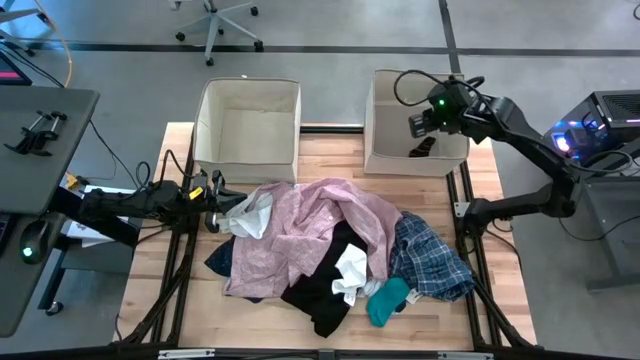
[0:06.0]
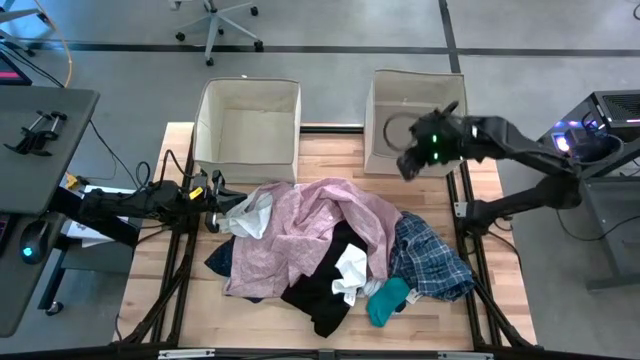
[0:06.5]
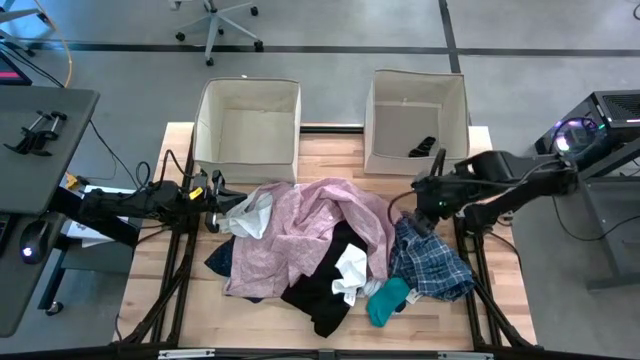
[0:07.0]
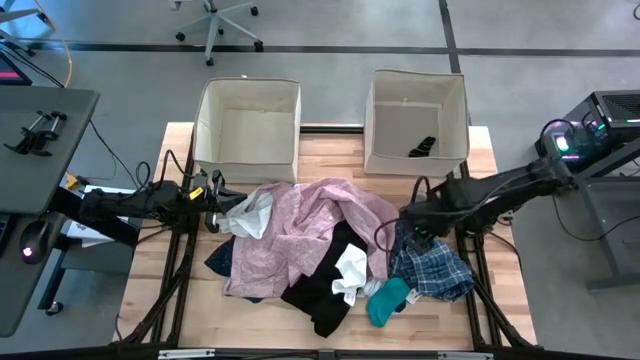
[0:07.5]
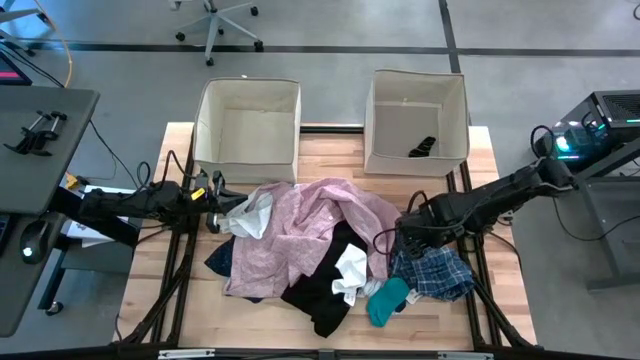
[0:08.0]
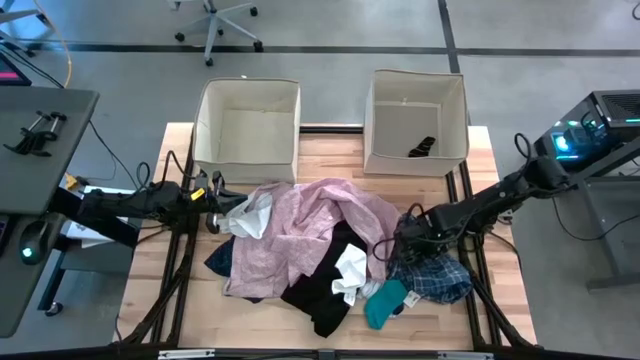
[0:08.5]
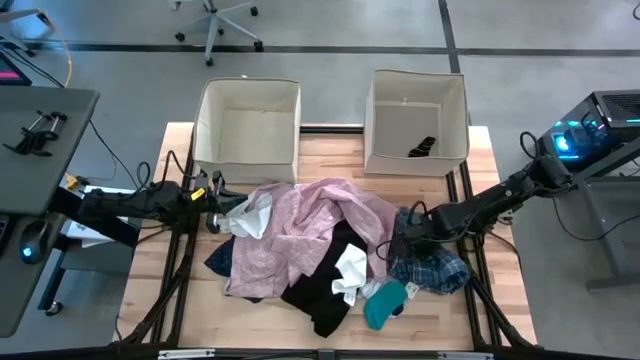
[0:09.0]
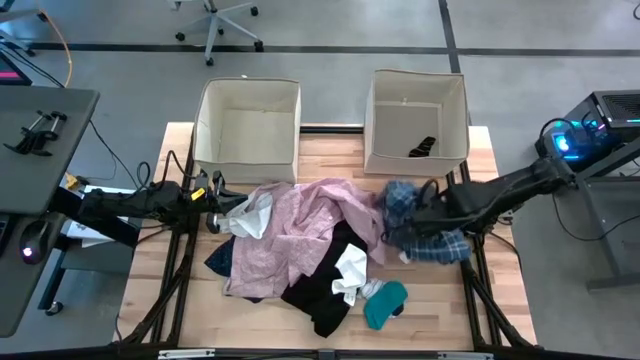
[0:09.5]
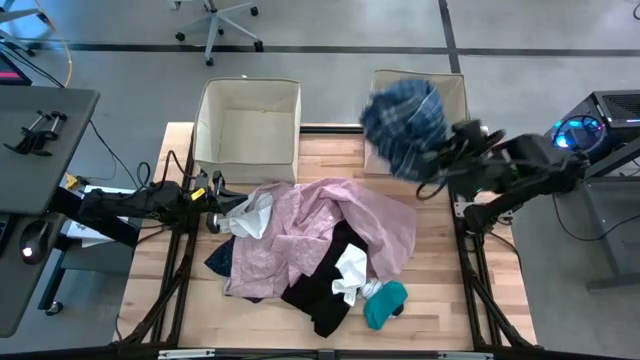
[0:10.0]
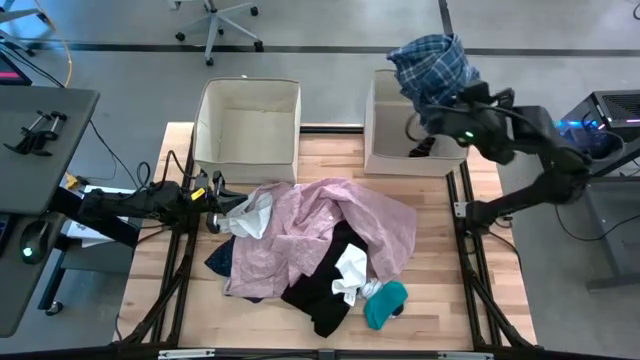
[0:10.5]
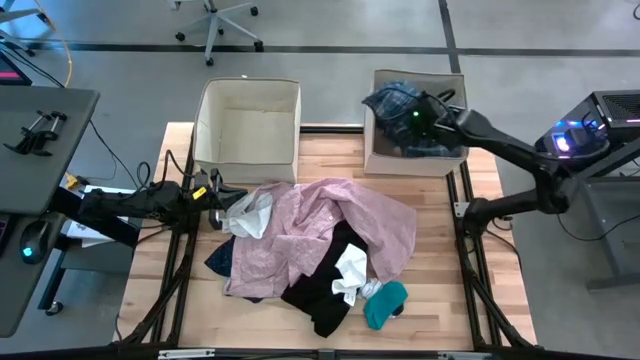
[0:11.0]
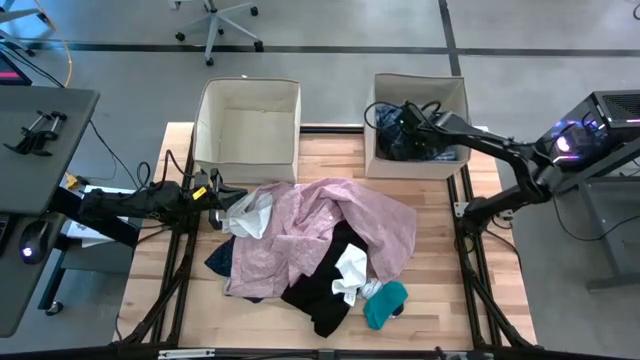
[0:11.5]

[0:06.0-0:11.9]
Task: Sort clothes
Put the blue checkered skirt into the top right laundry bin

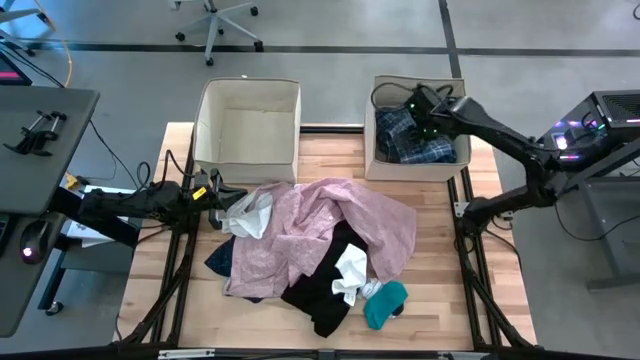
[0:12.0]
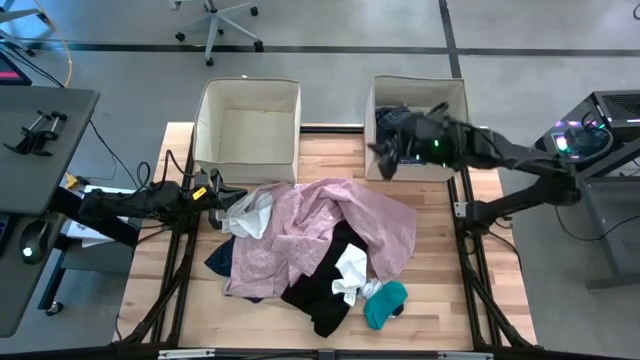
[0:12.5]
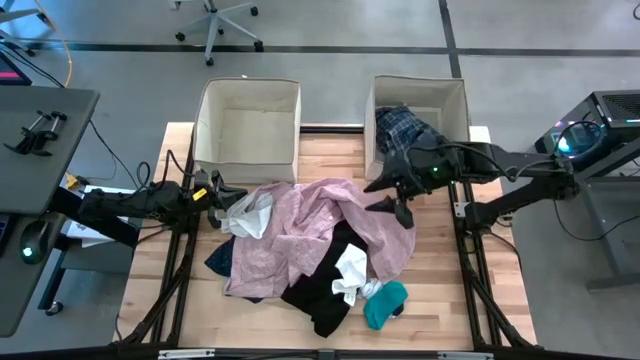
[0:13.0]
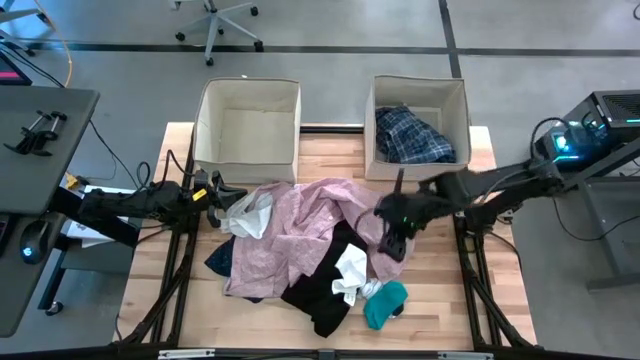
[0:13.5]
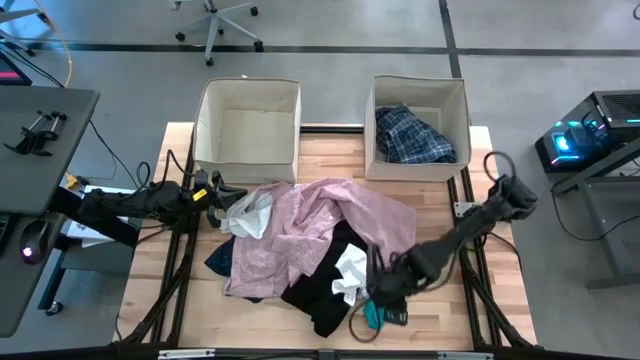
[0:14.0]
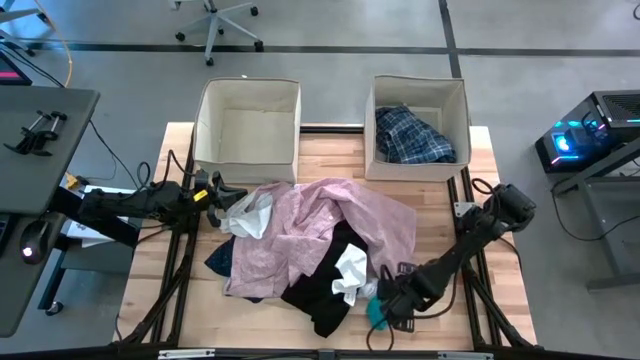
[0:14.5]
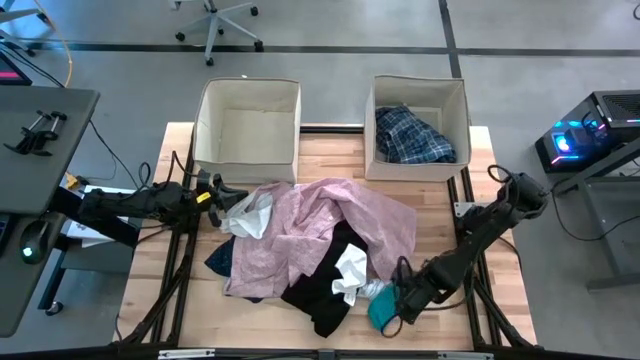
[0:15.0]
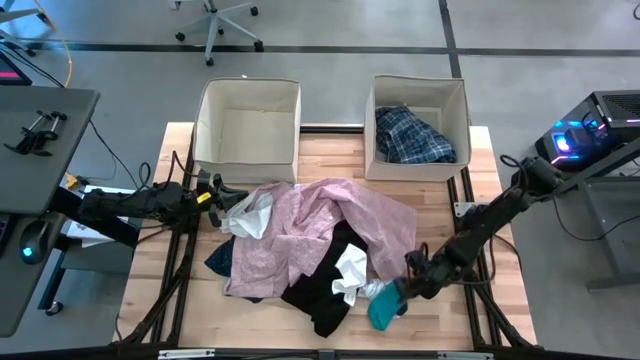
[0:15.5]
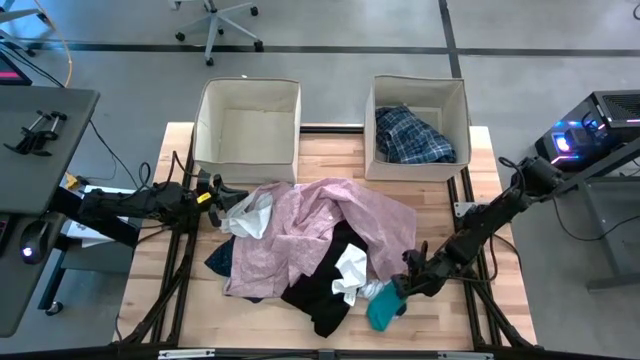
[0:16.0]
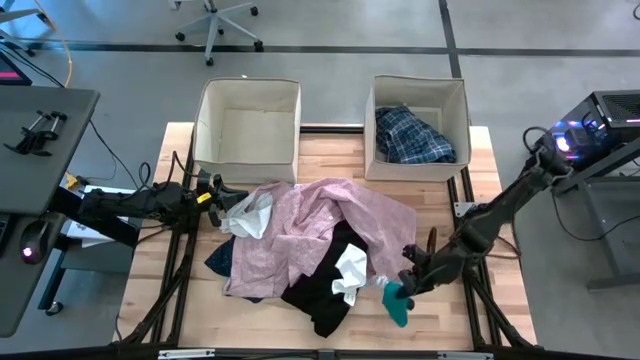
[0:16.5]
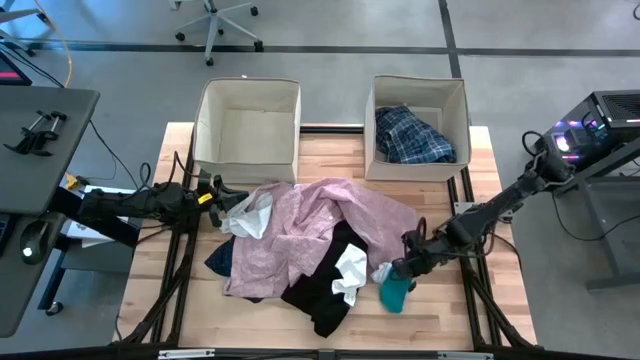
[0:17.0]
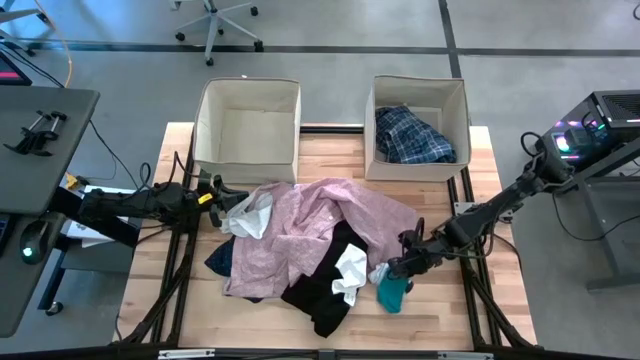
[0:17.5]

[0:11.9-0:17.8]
Put the blue sock into the top right laundry bin

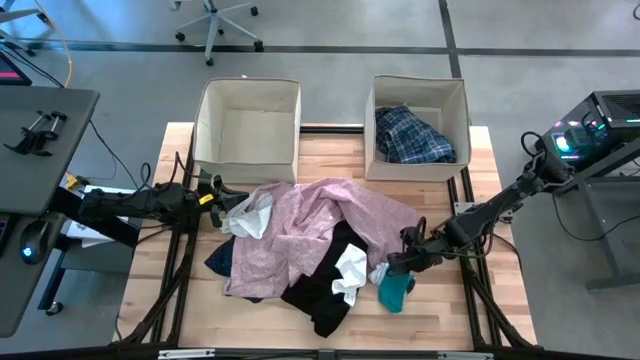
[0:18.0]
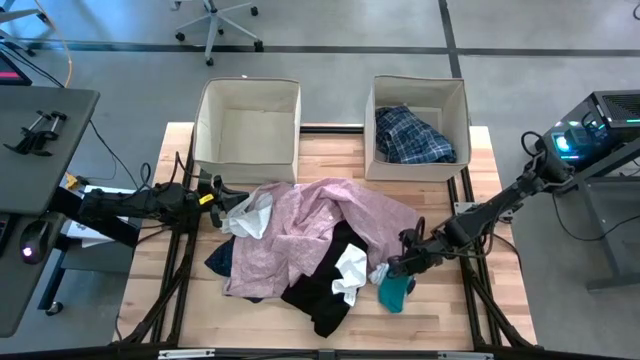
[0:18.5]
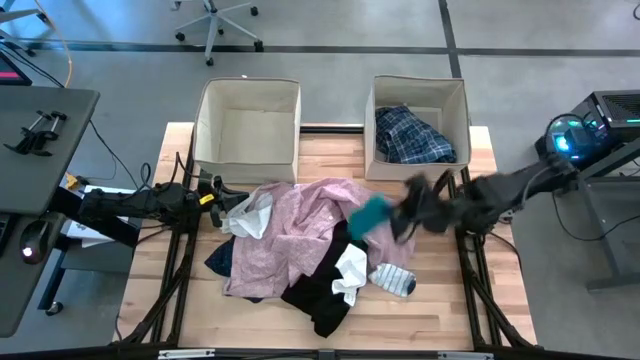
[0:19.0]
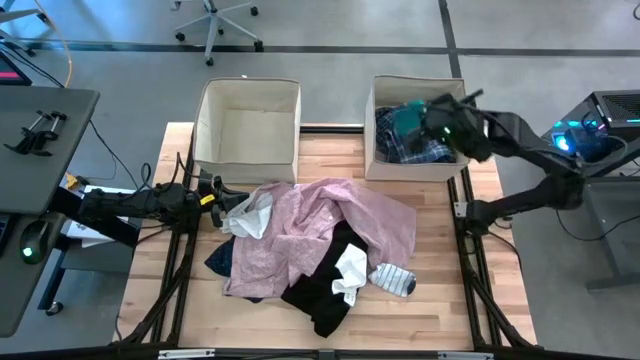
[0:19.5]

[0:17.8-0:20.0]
Put the blue sock into the top right laundry bin

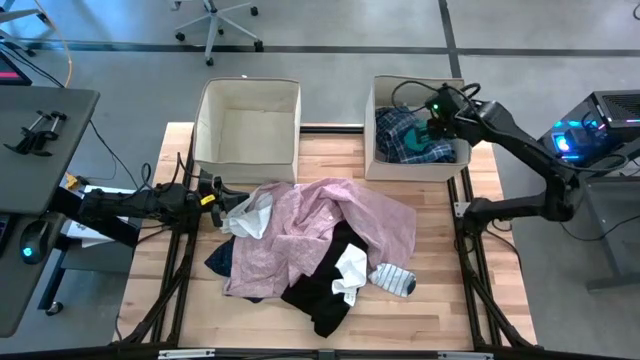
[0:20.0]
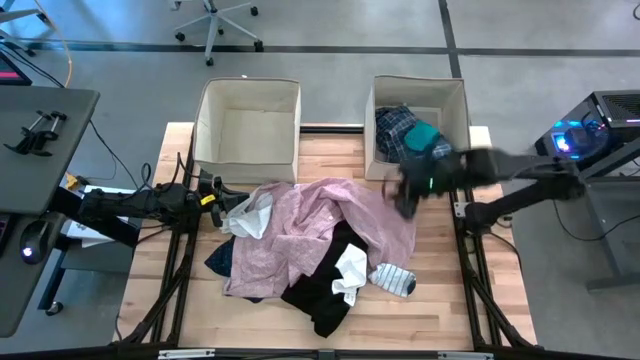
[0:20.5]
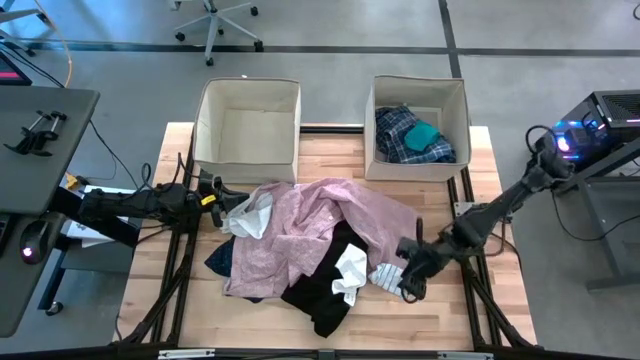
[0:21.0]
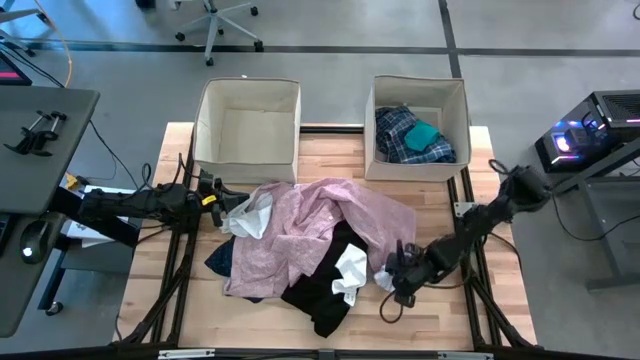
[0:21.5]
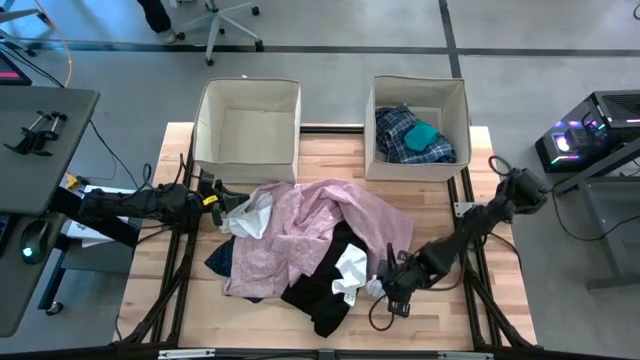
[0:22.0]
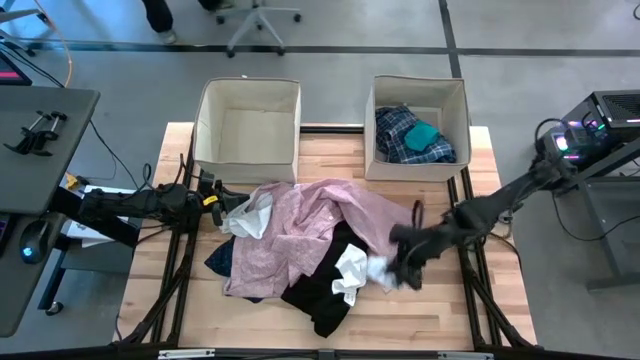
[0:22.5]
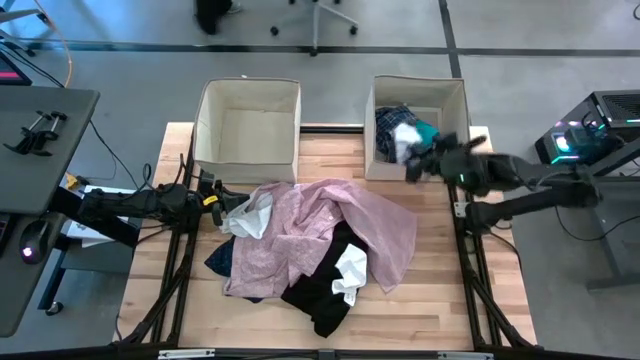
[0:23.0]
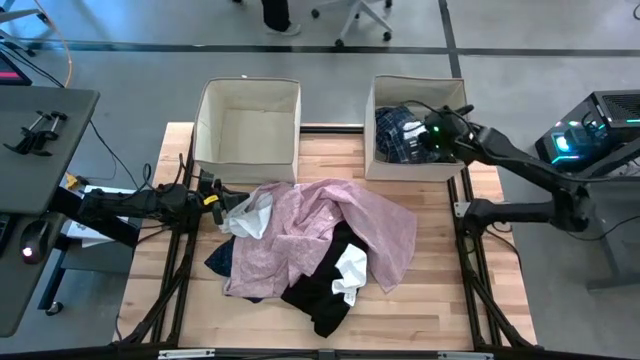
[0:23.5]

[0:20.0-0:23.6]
Put the white-blue sock into the top right laundry bin

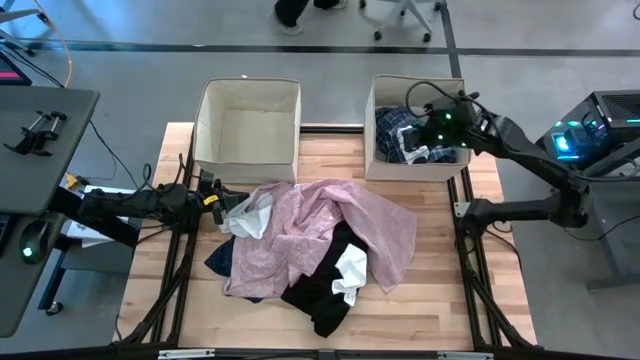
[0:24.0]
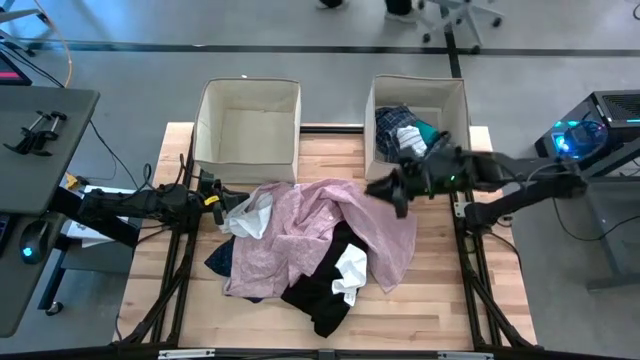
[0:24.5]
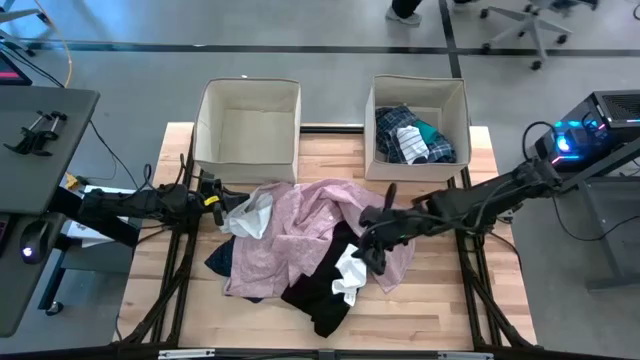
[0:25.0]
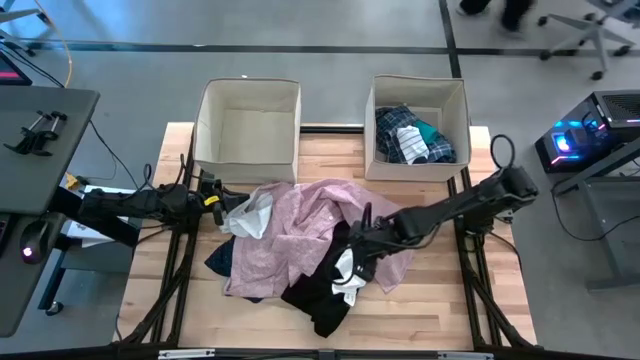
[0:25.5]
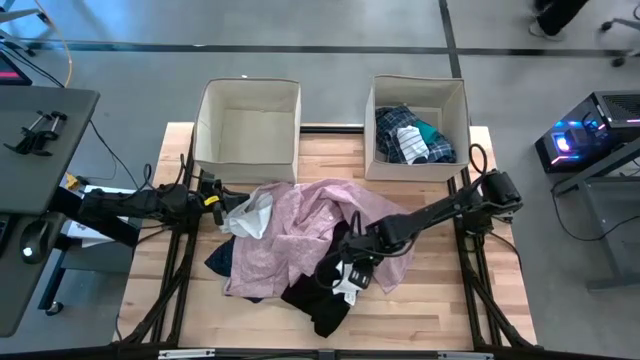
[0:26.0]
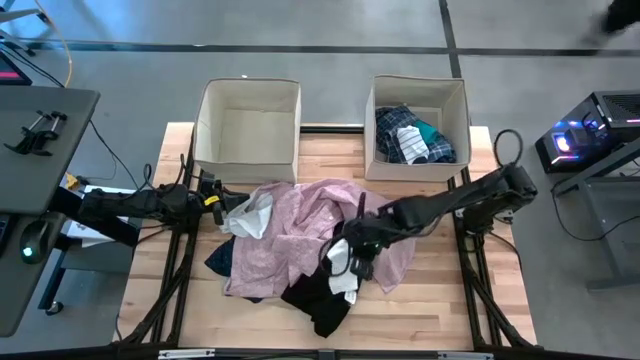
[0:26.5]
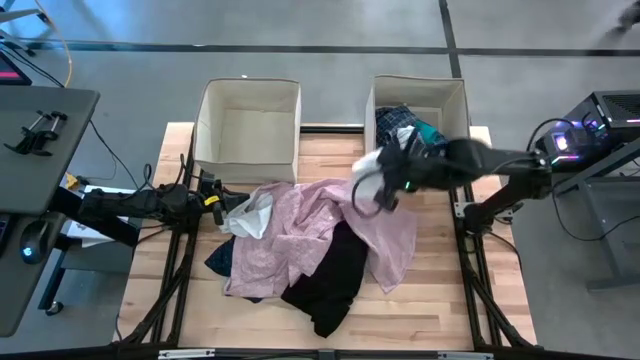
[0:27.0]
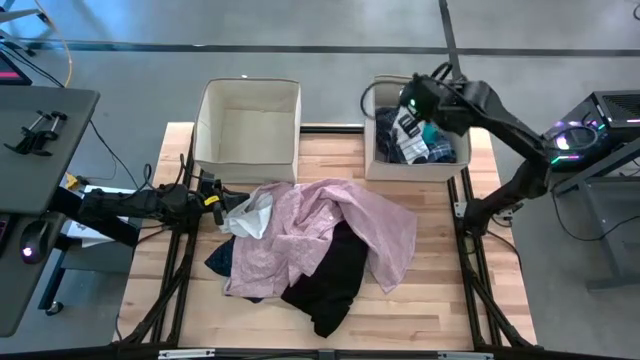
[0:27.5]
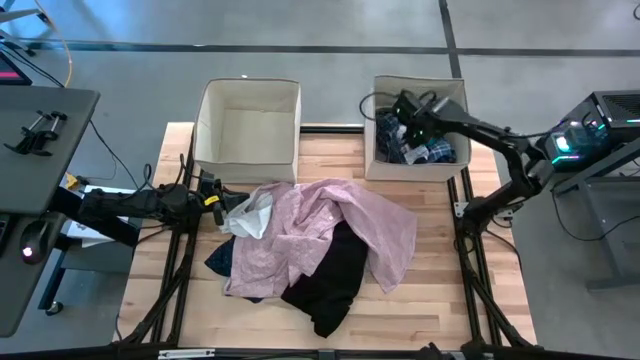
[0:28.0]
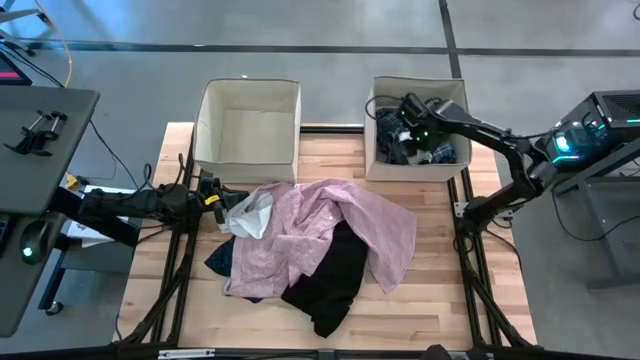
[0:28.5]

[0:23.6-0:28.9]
Put the white sock into the top right laundry bin
